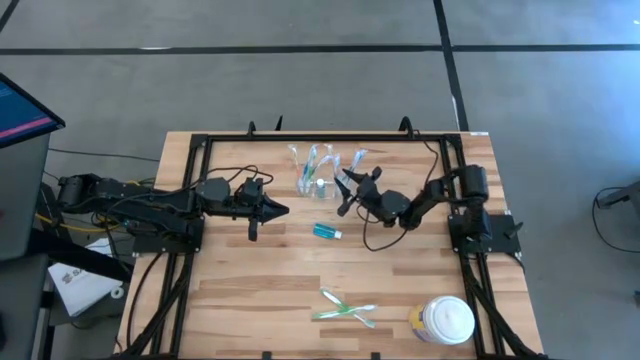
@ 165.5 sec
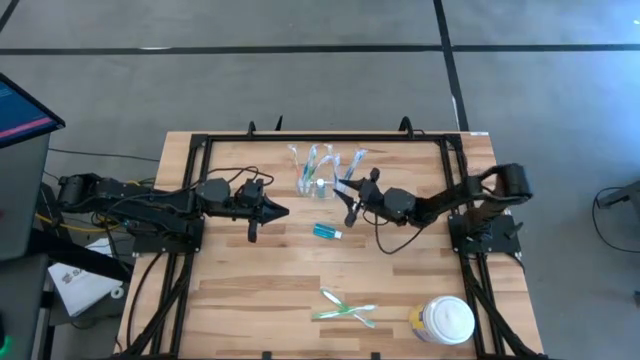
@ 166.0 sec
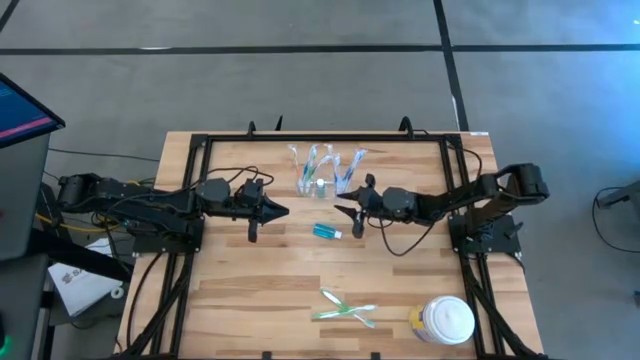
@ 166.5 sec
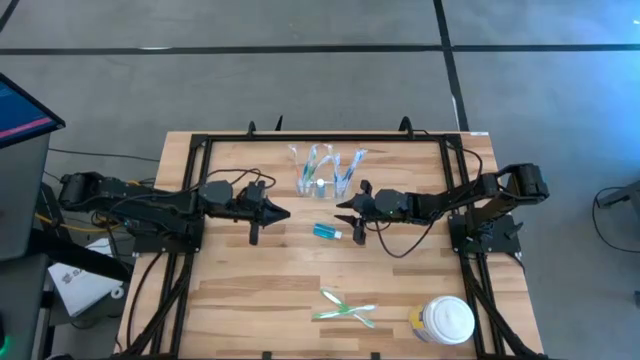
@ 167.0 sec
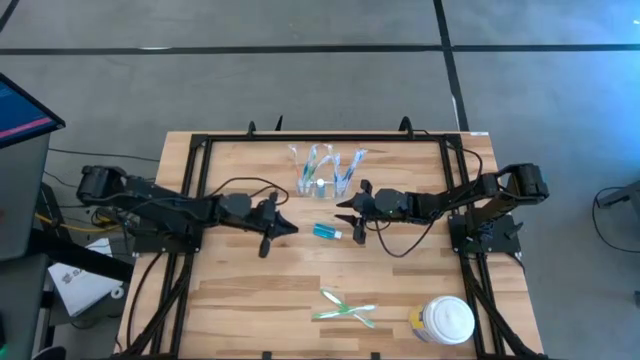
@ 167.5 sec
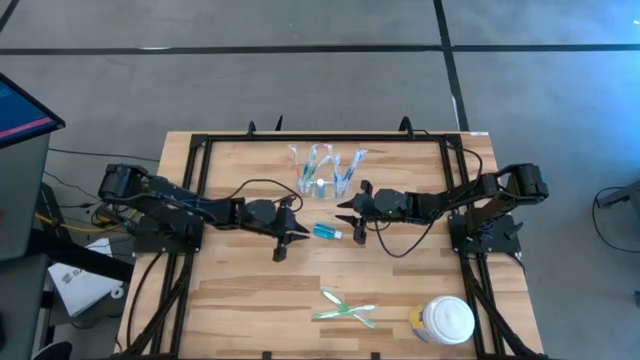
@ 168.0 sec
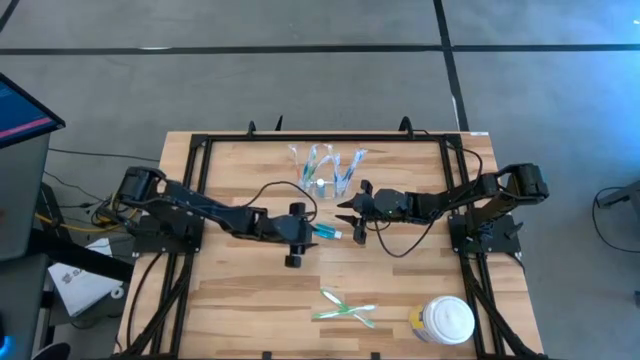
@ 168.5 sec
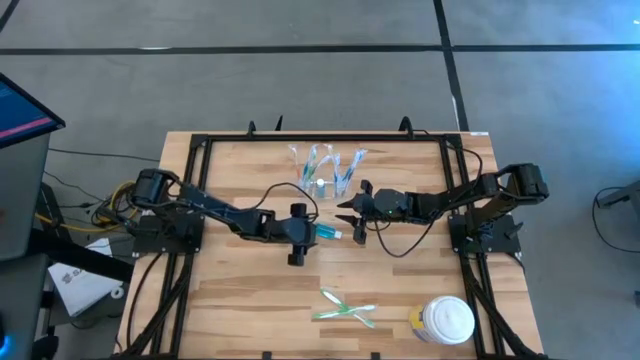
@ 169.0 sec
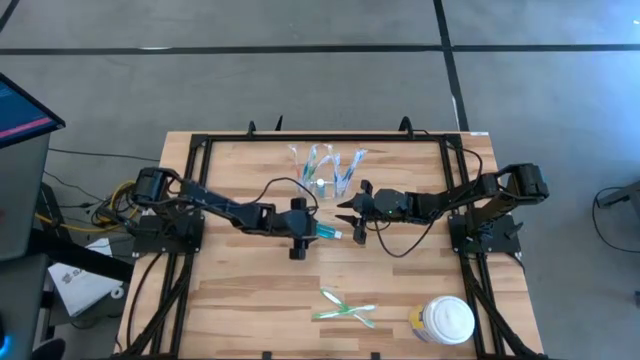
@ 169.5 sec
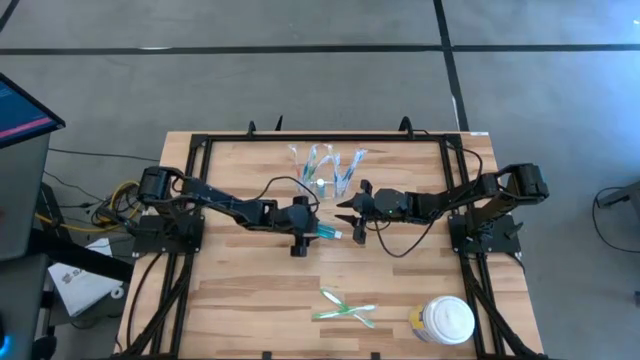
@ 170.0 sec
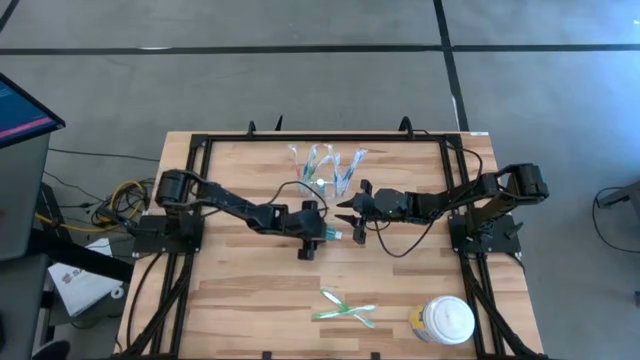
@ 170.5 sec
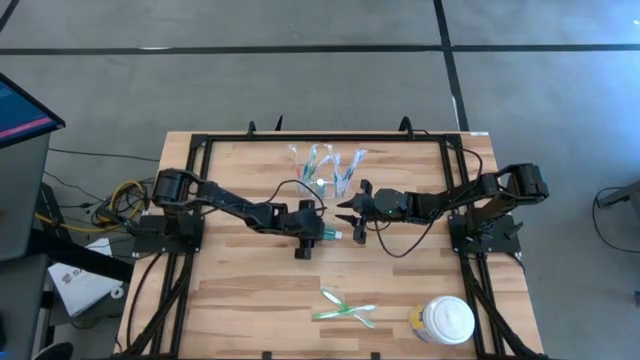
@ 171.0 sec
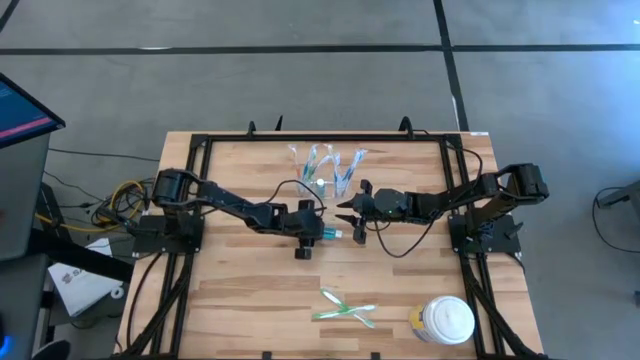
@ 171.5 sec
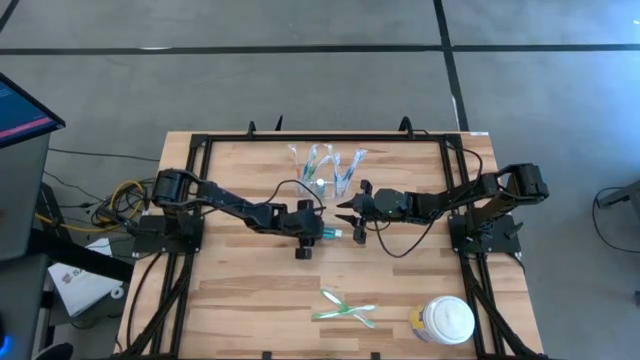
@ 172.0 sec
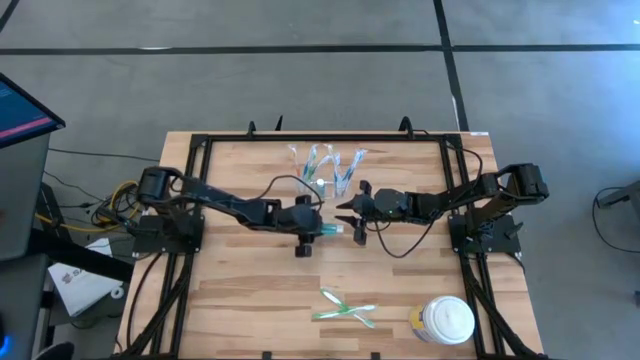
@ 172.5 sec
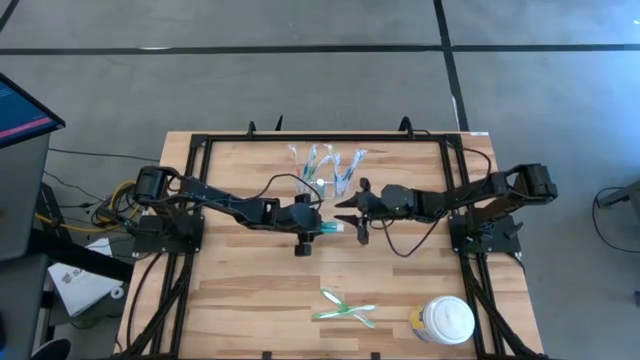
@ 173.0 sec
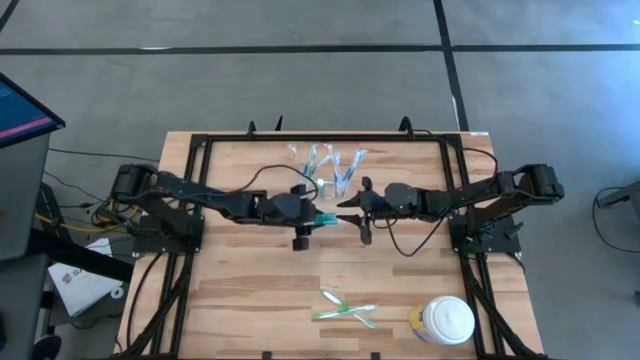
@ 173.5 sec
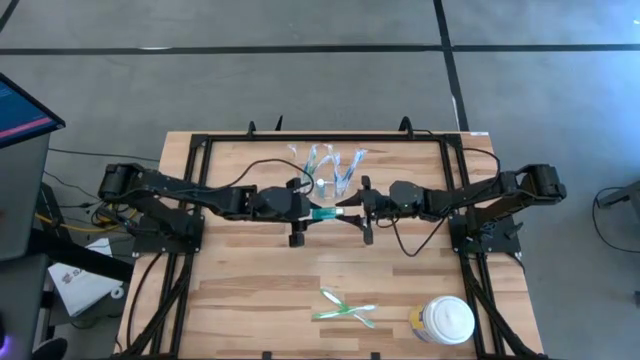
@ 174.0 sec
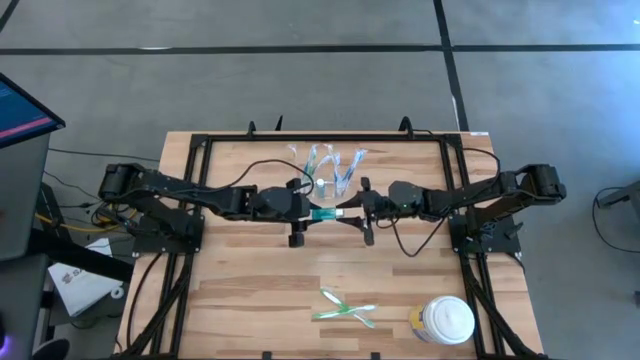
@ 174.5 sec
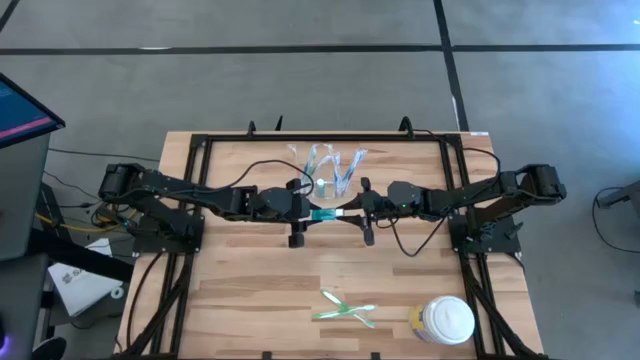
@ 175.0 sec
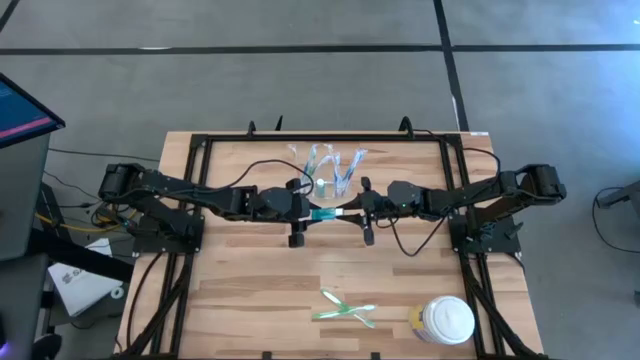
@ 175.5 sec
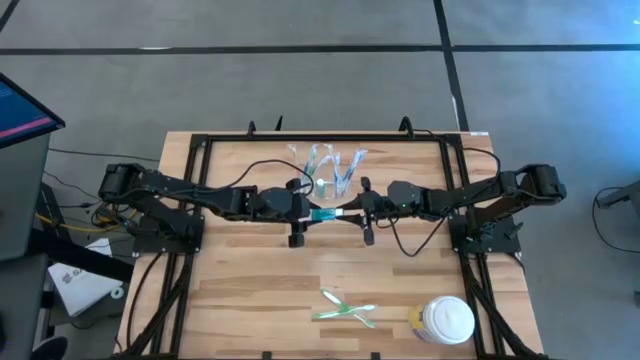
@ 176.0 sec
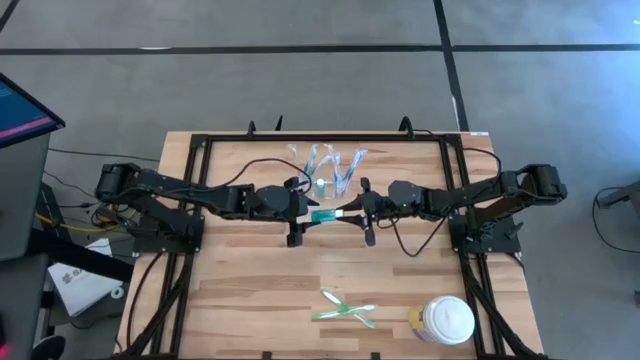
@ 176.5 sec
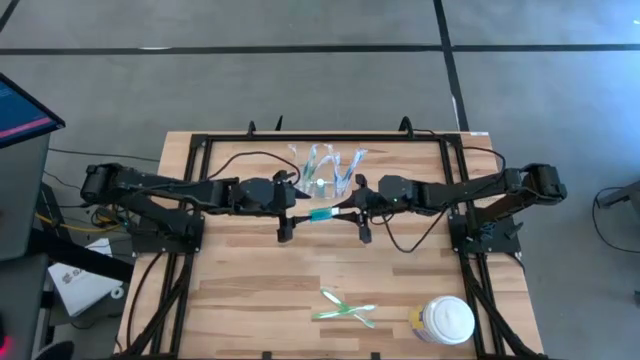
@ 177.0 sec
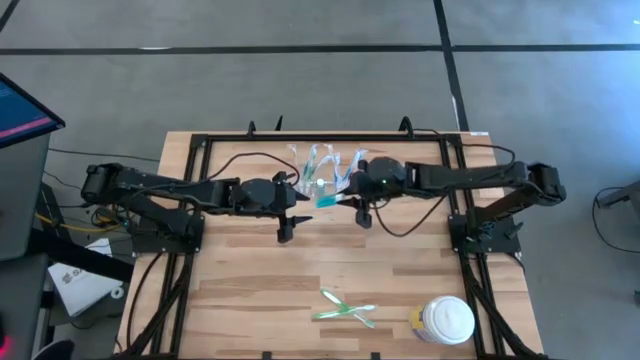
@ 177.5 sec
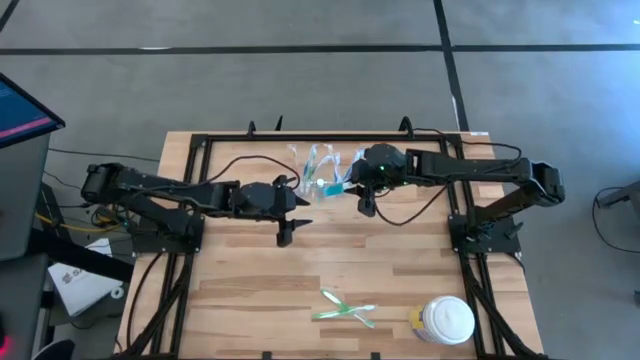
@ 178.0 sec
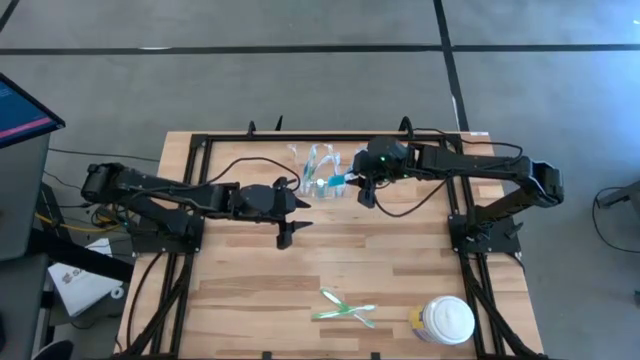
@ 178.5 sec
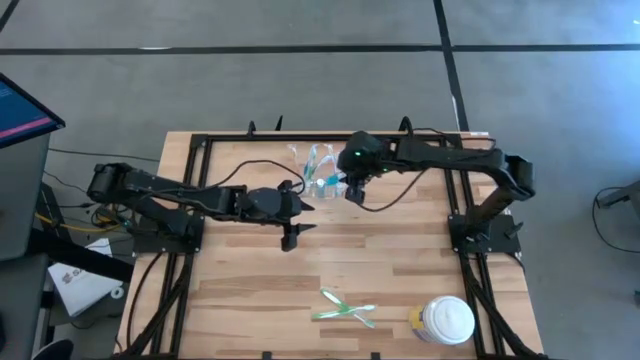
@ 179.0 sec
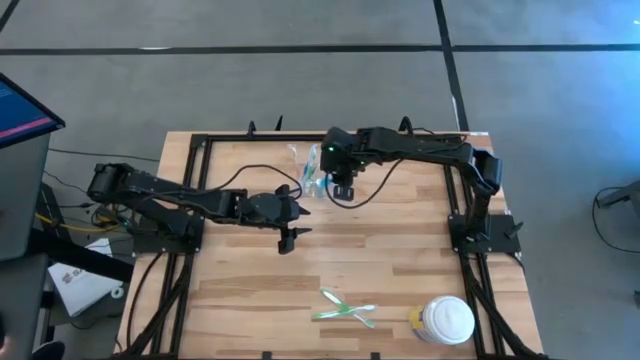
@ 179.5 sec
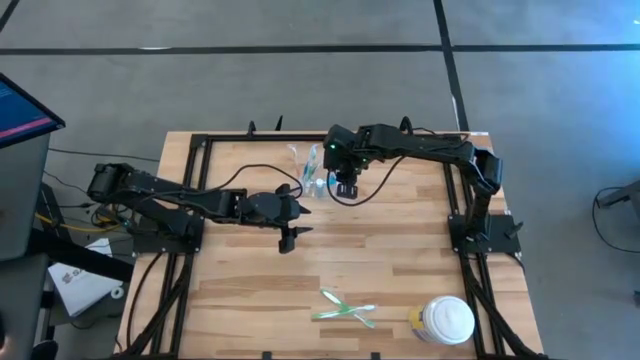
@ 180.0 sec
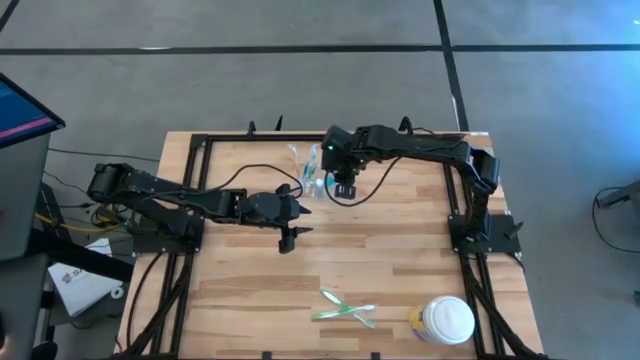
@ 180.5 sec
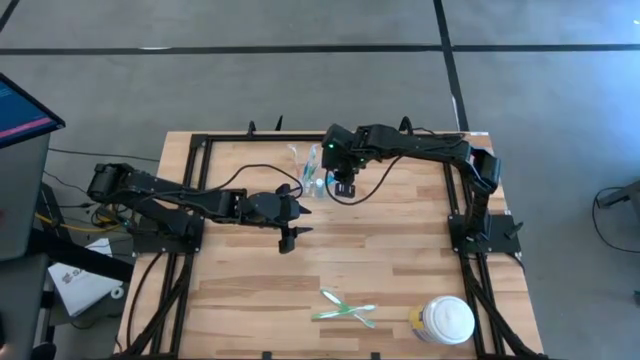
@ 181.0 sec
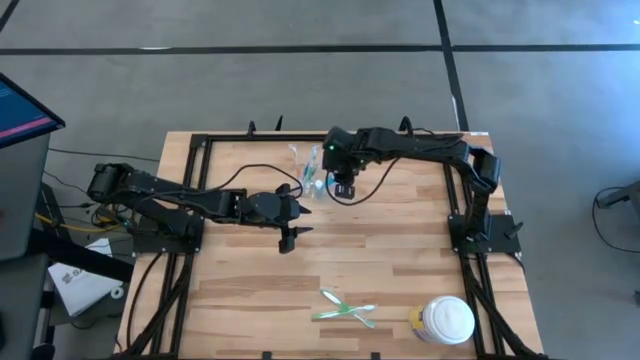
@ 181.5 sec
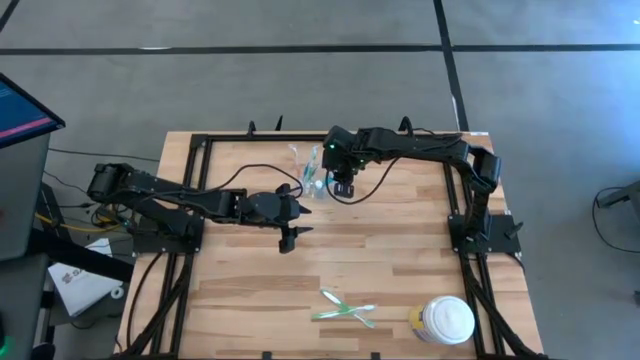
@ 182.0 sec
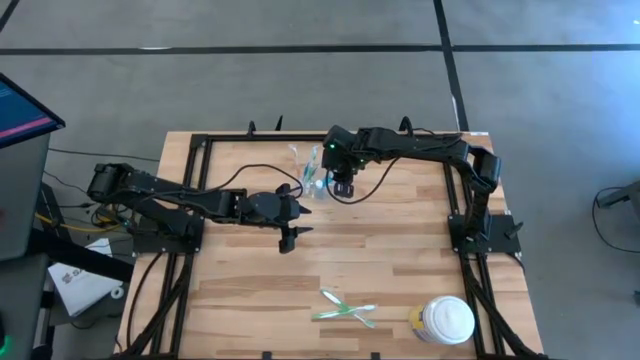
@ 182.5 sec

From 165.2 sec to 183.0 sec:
Task: Pick & Place toothbrushing station
Put the blue mouthwash into the transparent organizer
